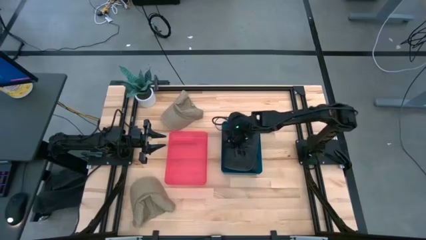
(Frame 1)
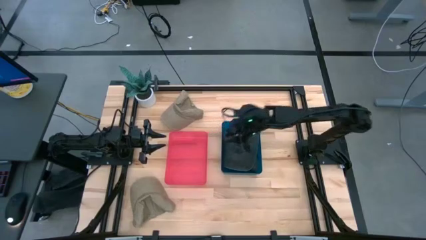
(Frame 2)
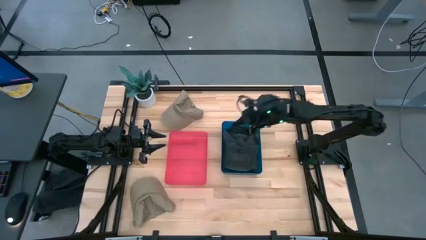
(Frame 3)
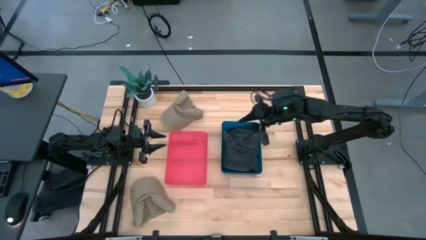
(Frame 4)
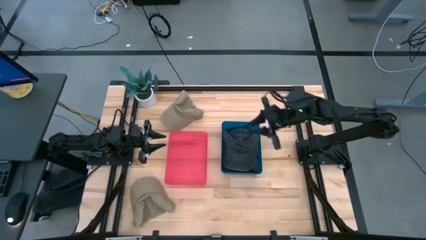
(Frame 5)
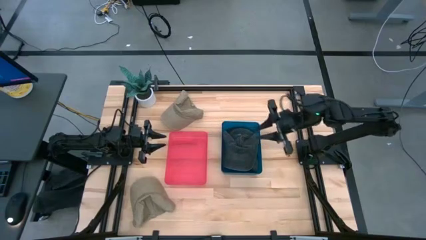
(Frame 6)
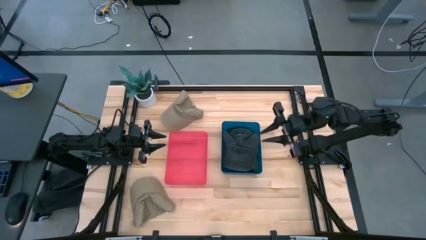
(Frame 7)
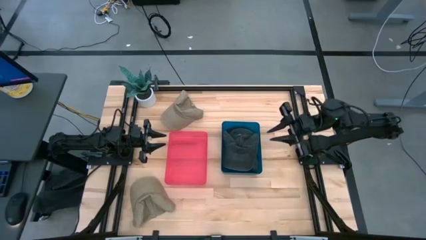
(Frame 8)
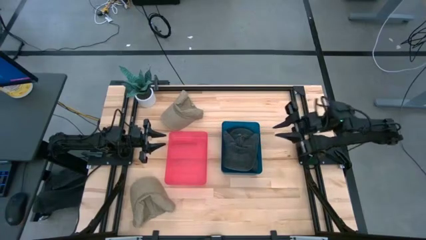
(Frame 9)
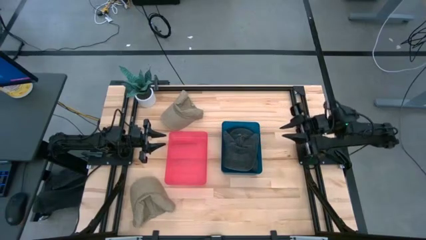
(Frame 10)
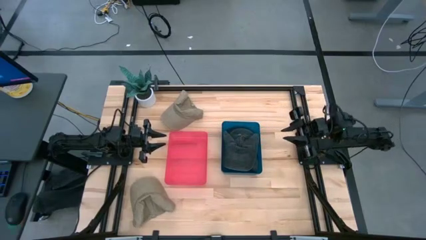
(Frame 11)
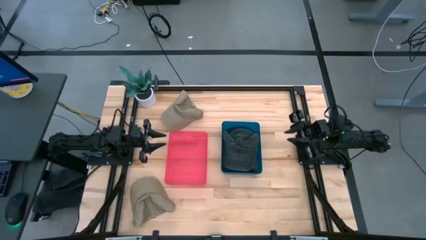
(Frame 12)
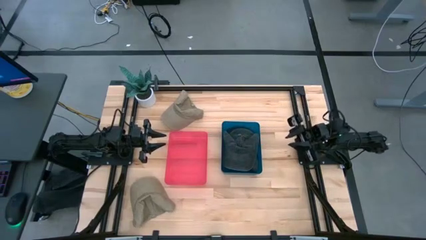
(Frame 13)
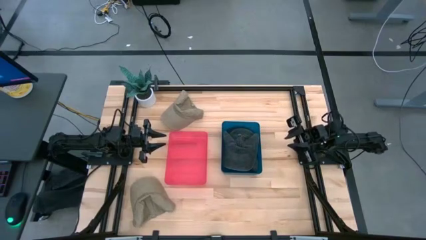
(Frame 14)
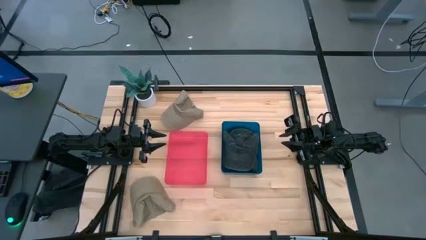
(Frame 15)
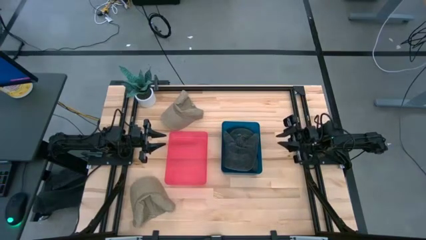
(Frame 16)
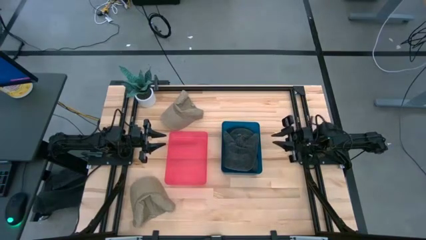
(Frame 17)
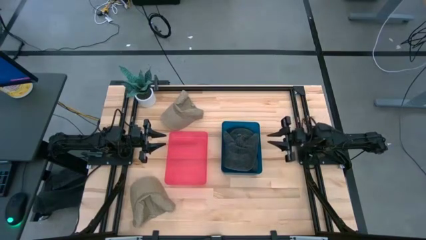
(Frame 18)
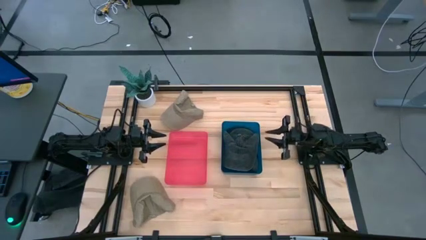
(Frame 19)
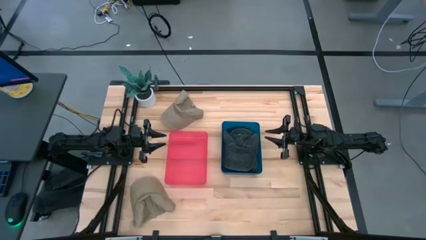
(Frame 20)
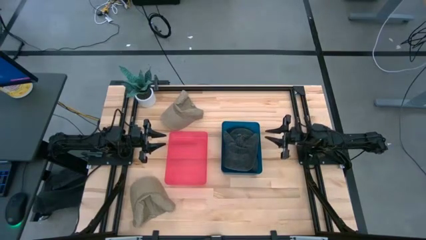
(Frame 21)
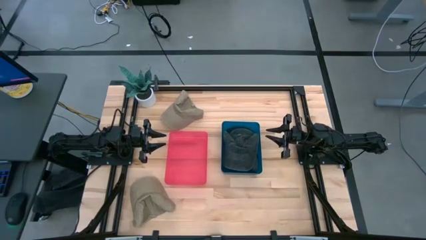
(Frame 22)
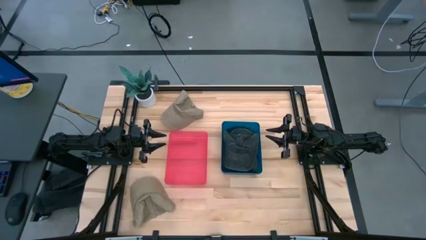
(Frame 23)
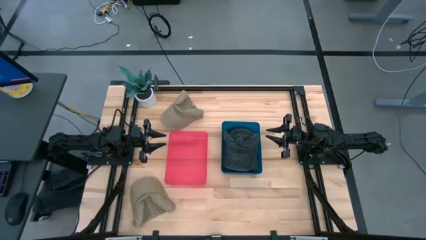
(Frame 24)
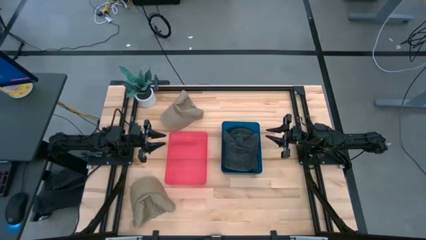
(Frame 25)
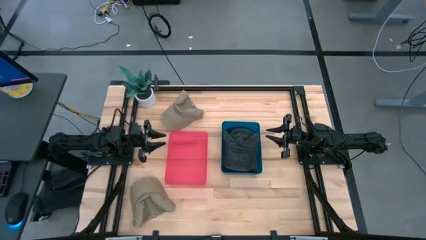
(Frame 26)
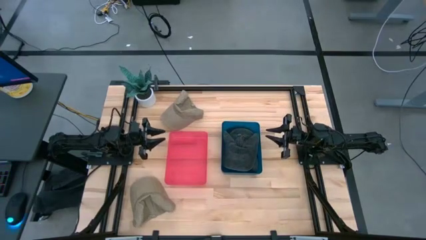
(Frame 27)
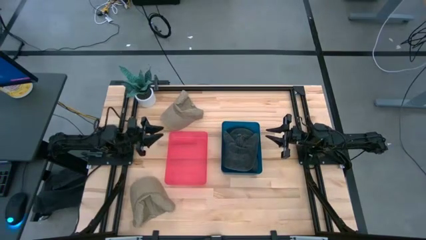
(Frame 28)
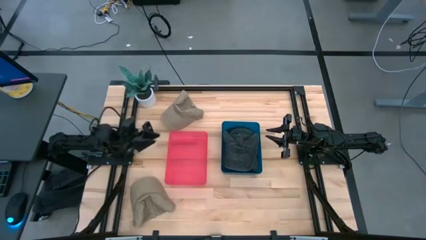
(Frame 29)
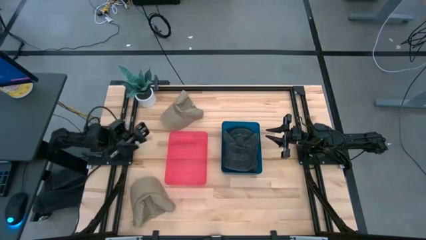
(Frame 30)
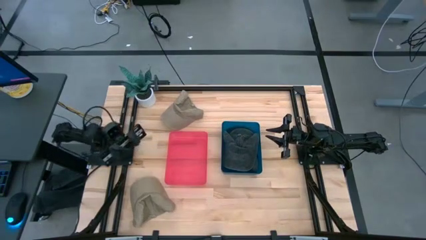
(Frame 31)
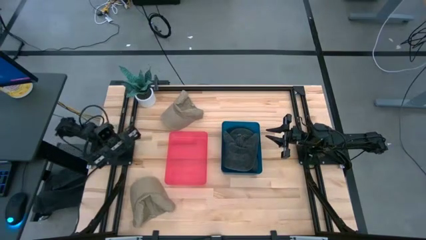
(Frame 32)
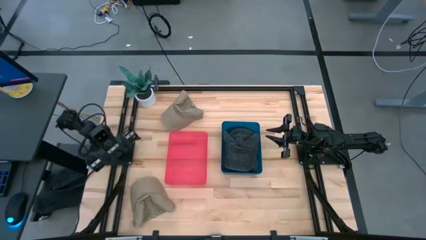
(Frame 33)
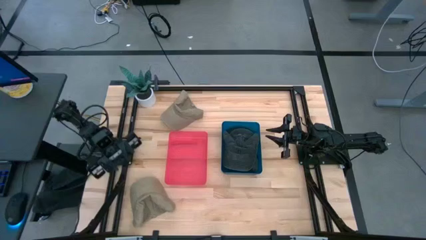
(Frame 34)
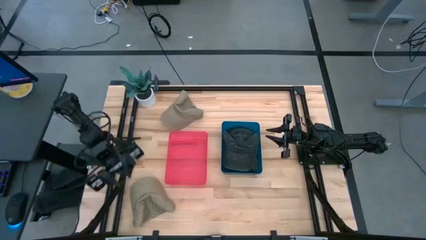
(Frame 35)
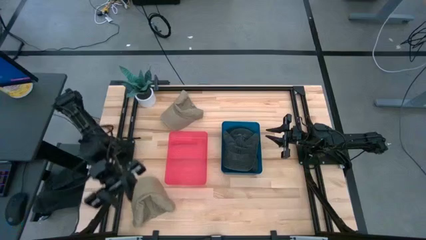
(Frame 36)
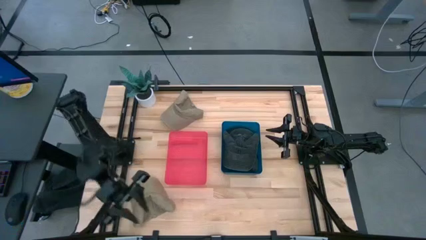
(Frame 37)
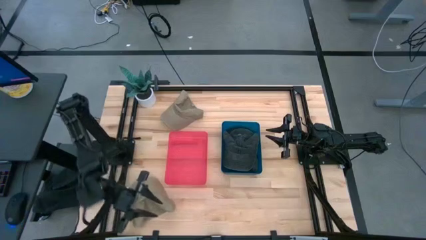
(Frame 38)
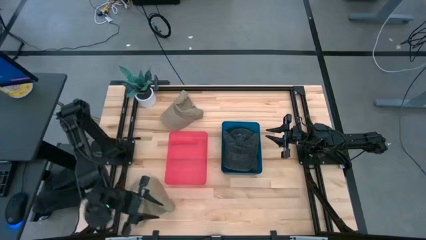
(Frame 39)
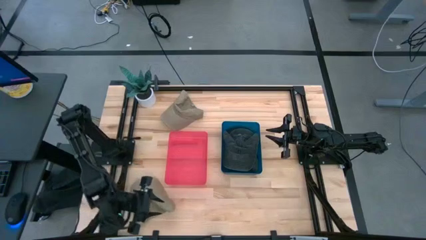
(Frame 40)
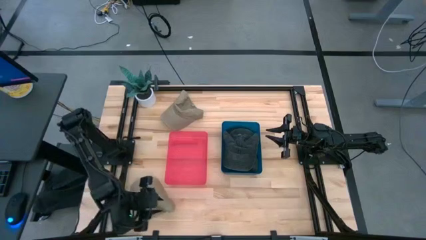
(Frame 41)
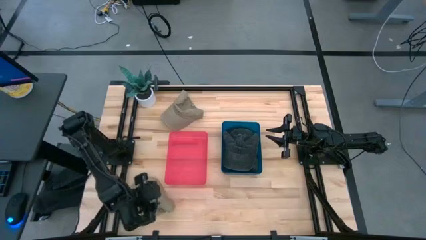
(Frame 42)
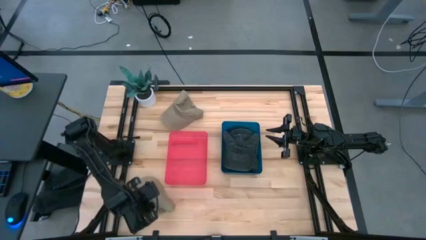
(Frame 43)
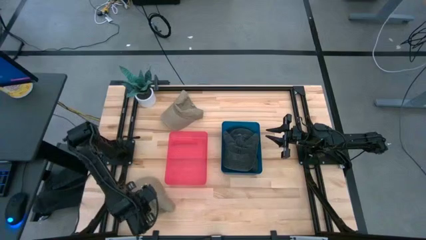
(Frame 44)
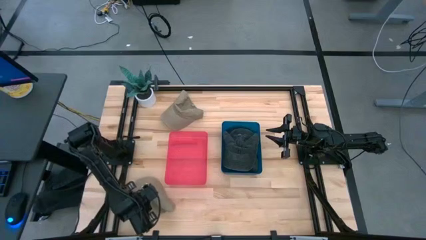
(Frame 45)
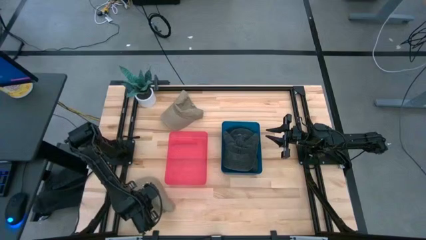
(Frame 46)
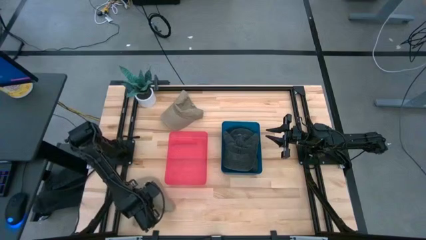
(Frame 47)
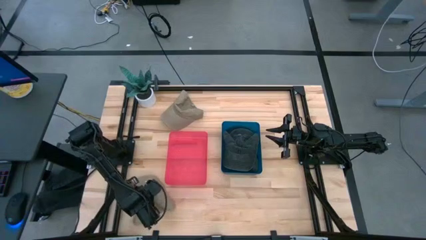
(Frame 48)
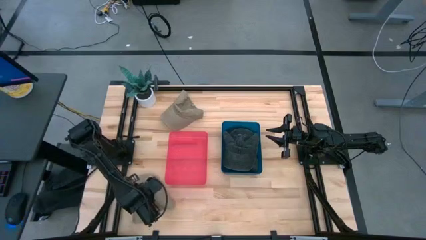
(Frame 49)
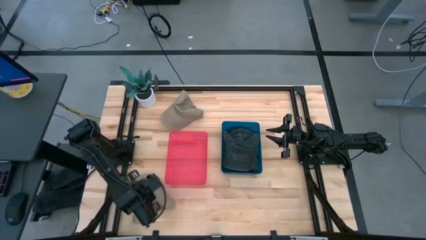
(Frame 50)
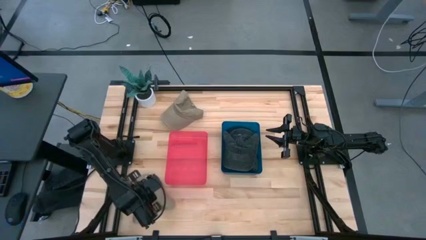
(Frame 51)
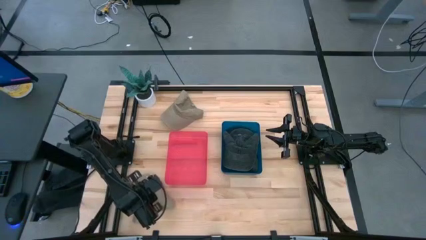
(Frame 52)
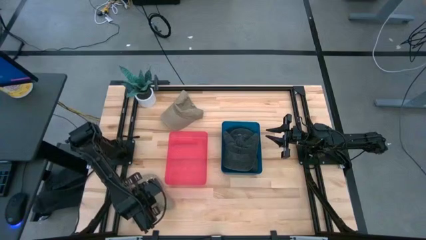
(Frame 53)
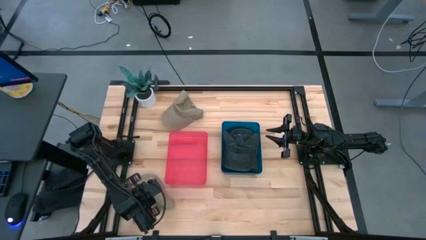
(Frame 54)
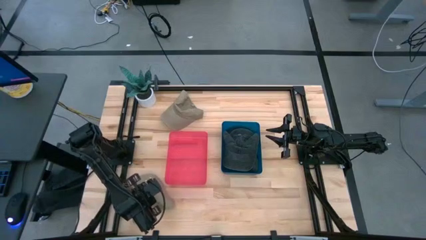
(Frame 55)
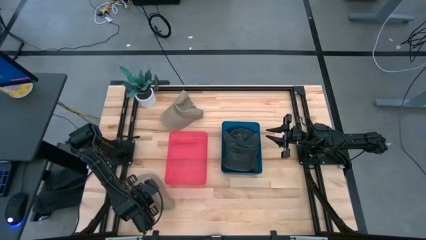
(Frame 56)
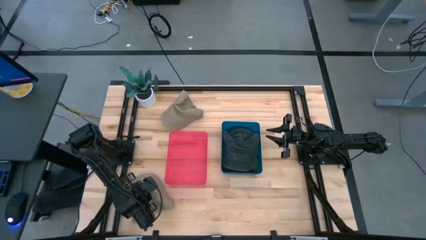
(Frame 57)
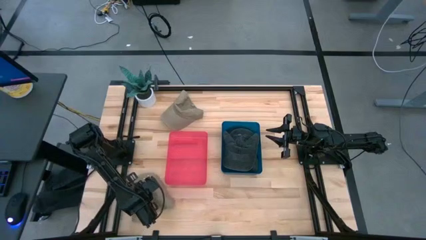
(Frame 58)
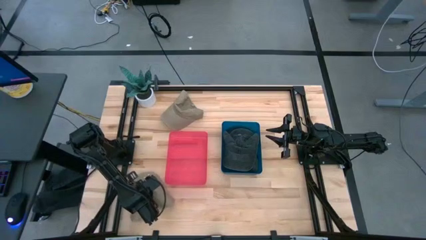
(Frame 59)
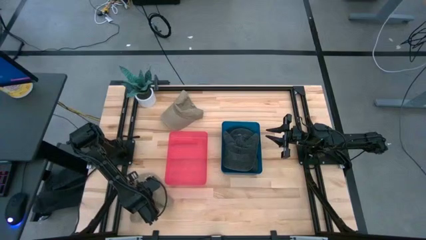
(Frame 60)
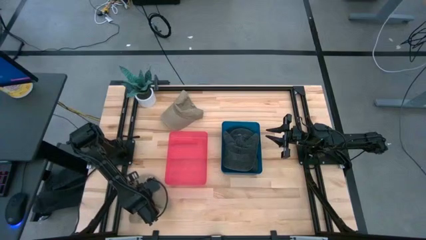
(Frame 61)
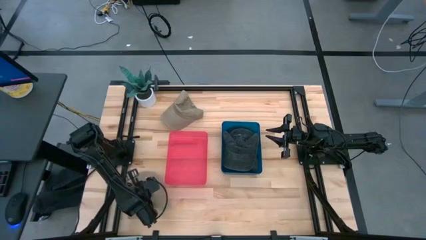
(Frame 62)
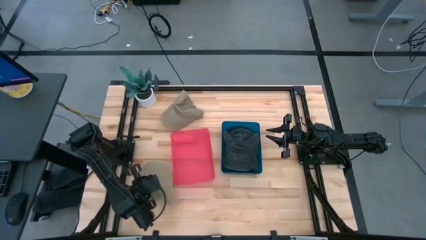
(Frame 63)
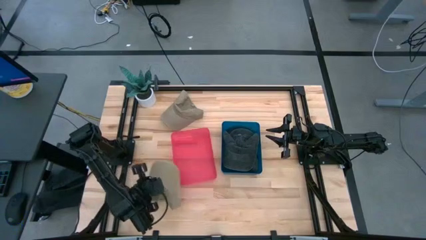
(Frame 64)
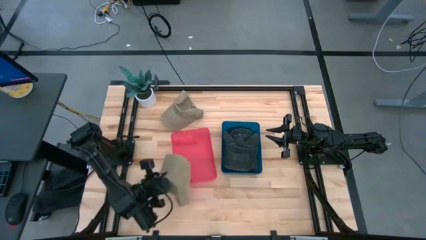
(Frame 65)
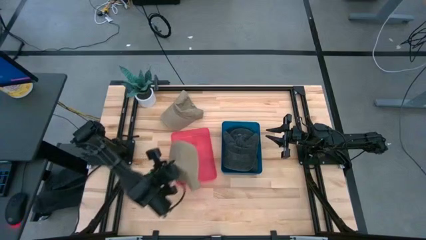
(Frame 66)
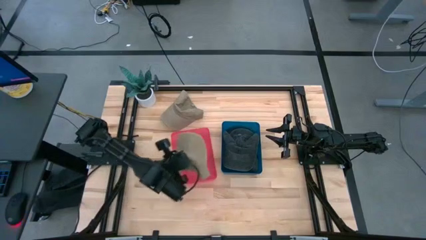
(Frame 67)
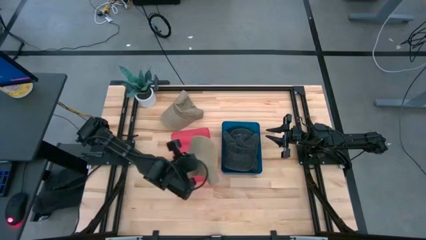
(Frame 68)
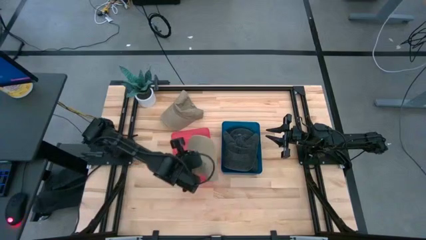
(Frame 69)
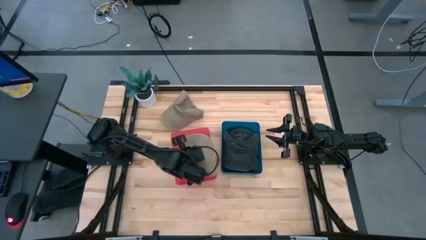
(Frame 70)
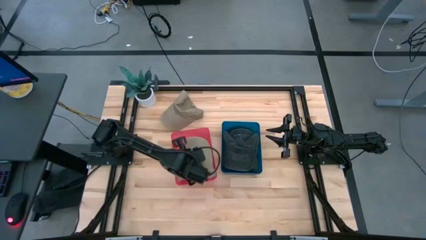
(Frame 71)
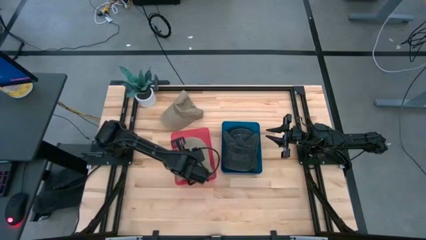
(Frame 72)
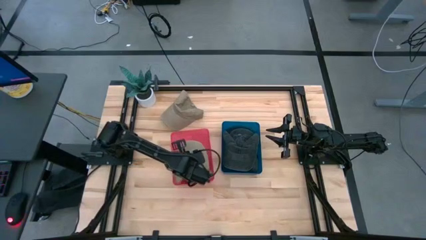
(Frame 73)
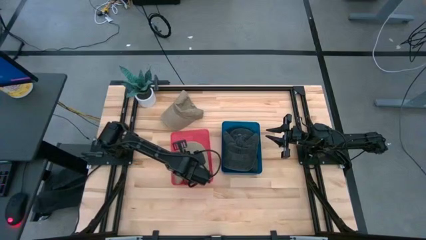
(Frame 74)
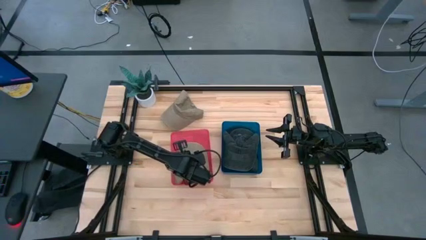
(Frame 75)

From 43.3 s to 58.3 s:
Task: Pick & Place hat
Put the bottom brown cap into the red bin

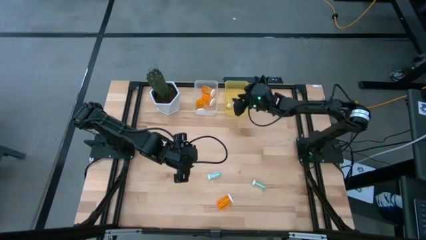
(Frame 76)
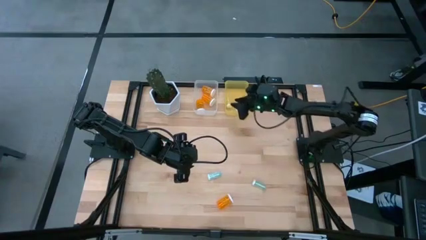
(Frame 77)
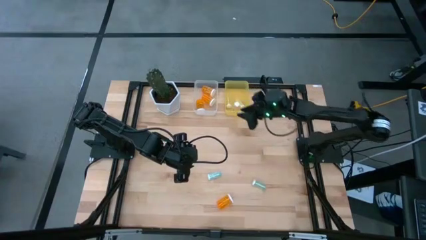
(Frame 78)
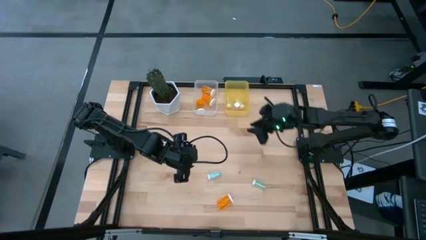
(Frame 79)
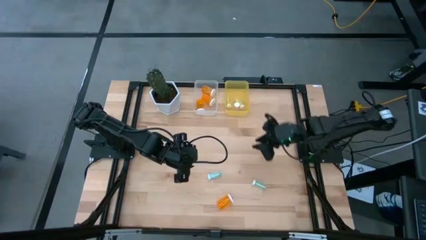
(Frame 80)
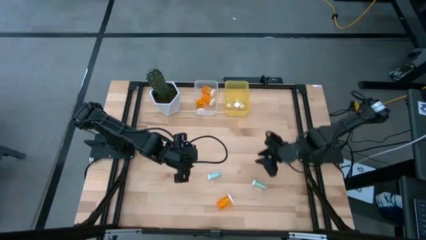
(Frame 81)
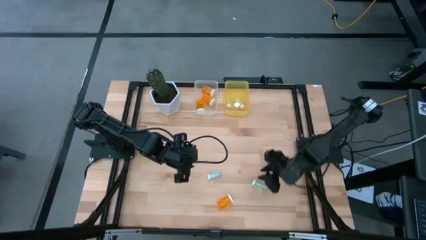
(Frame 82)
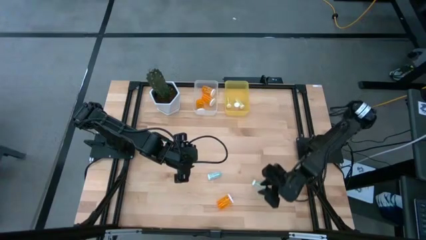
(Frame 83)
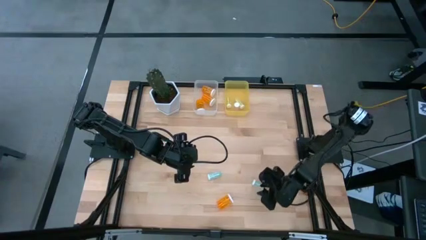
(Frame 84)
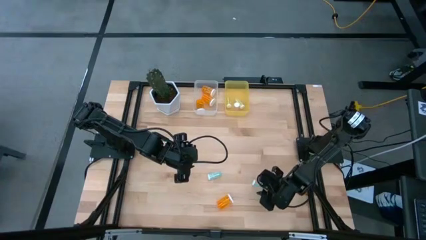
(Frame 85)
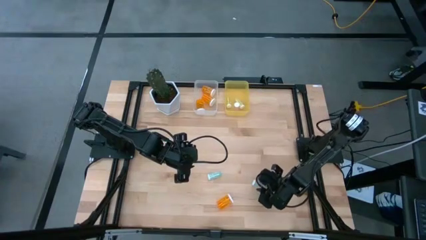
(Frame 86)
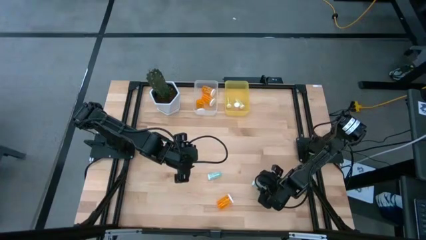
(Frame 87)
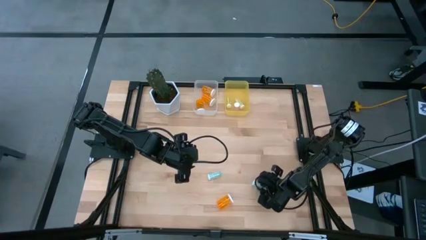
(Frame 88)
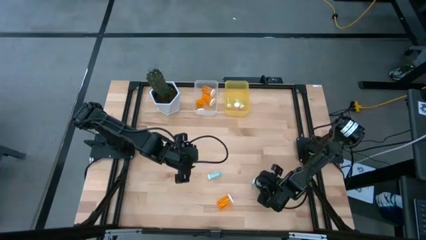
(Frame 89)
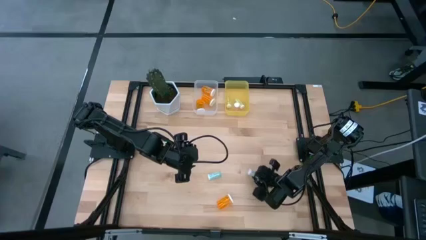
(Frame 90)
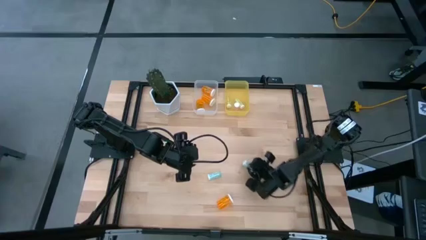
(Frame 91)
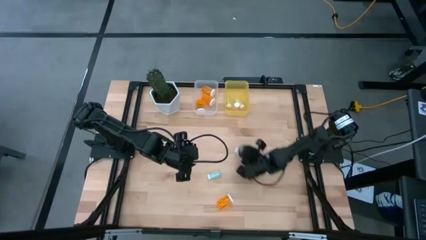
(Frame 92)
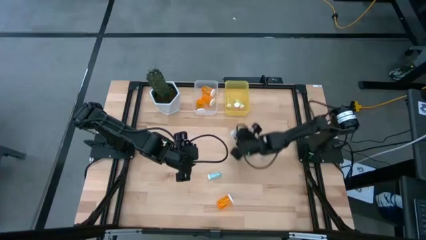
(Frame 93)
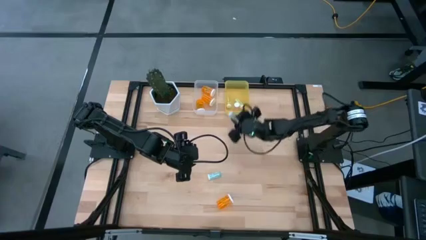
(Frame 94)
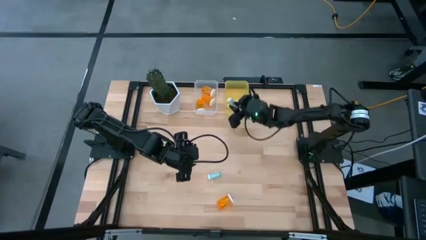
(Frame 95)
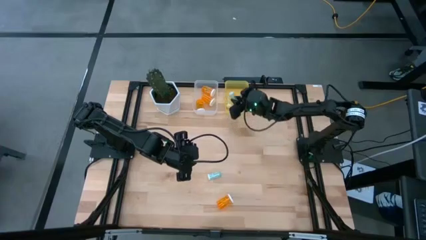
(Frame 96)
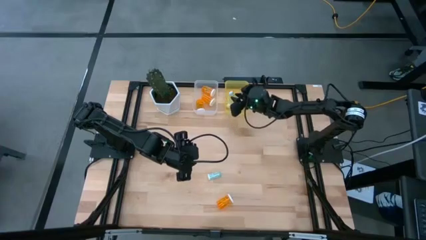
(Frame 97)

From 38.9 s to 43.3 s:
Task: Pick and place medicine bottles into bin by pill shape (circle, oval)
Put the right blue pill bottle into the yellow bin
